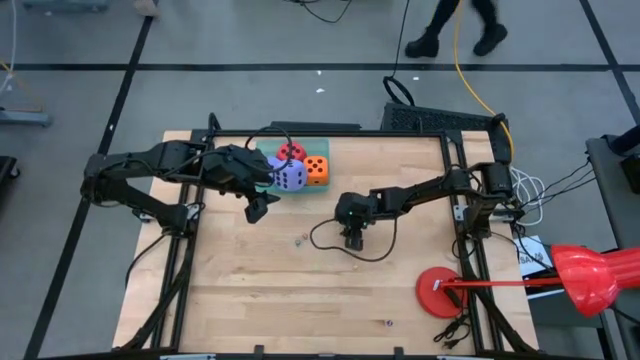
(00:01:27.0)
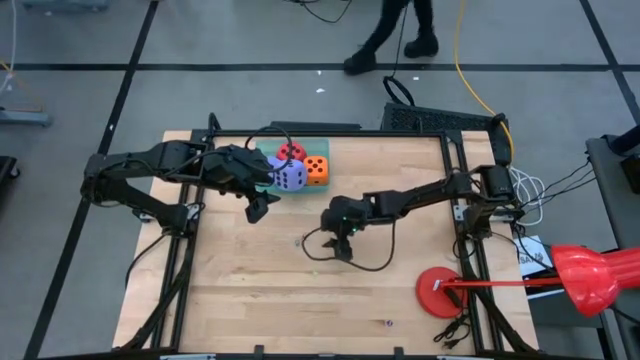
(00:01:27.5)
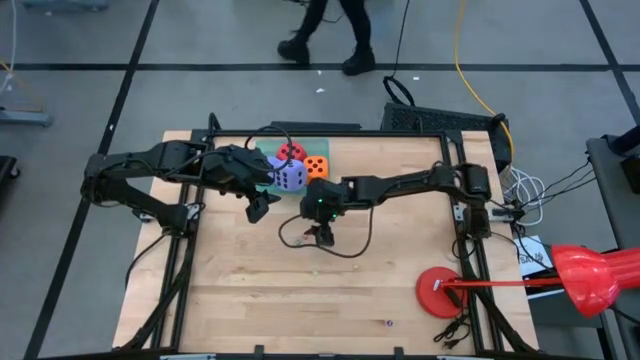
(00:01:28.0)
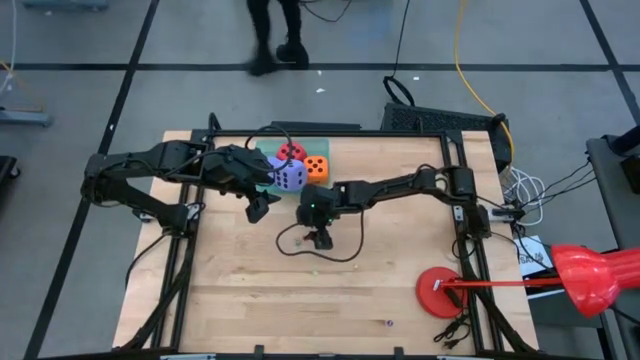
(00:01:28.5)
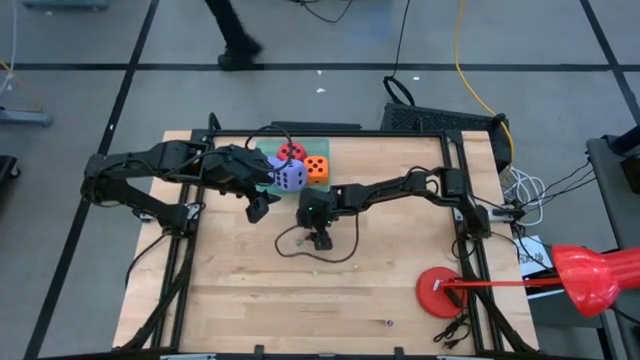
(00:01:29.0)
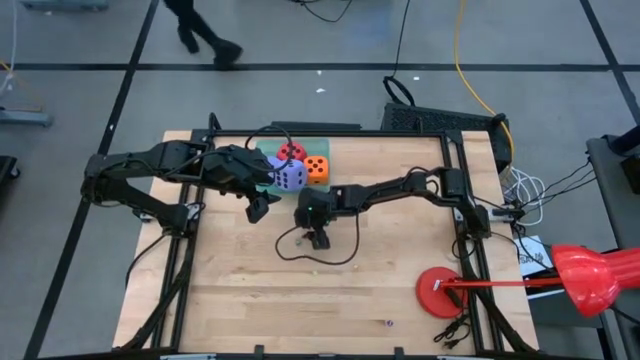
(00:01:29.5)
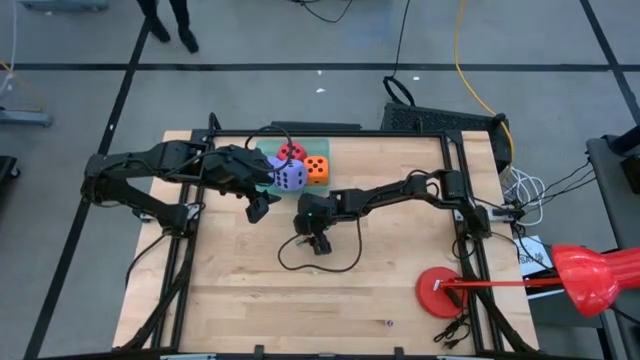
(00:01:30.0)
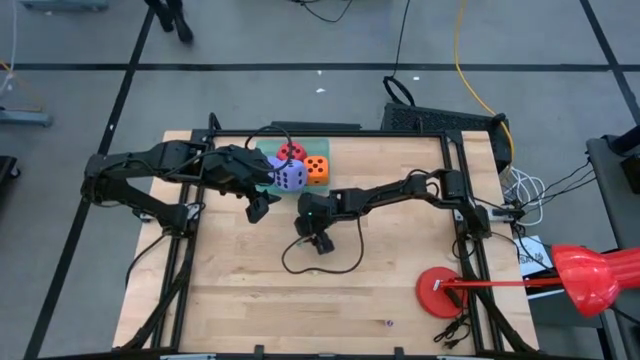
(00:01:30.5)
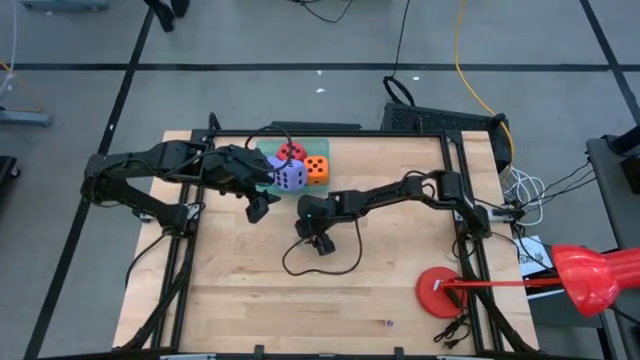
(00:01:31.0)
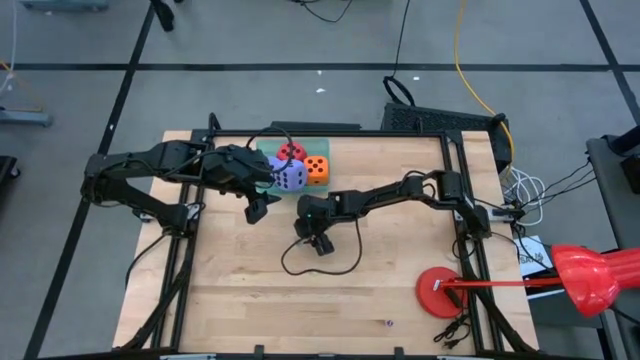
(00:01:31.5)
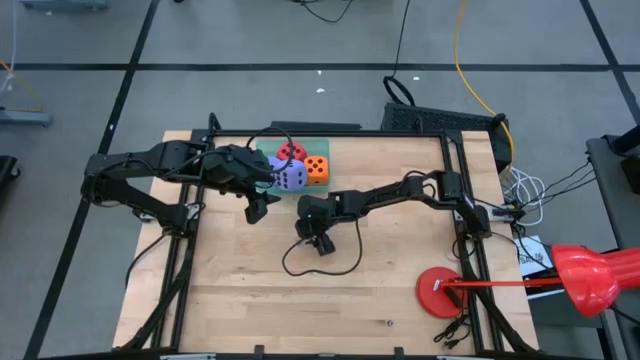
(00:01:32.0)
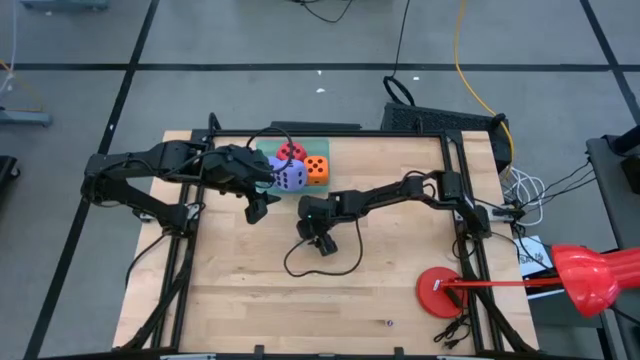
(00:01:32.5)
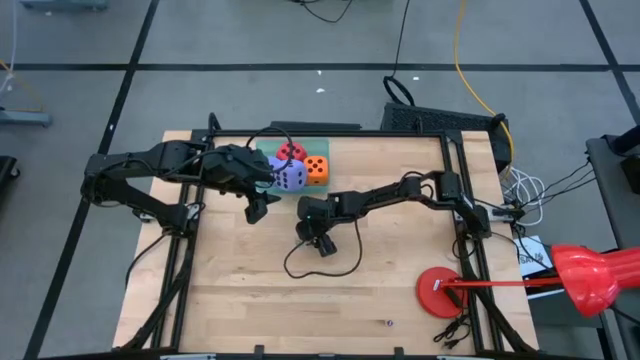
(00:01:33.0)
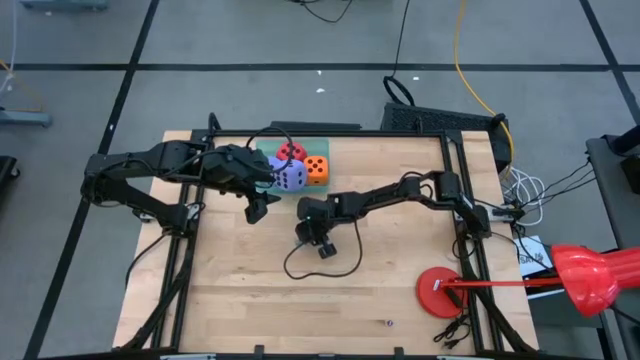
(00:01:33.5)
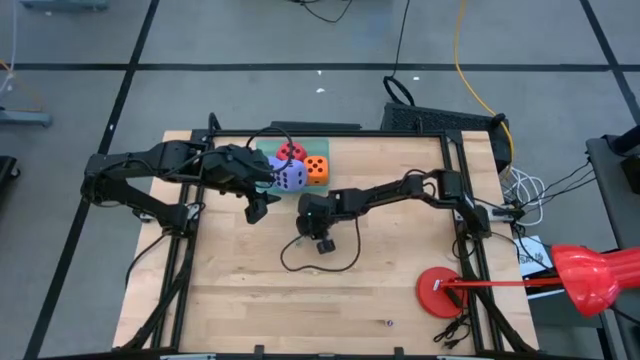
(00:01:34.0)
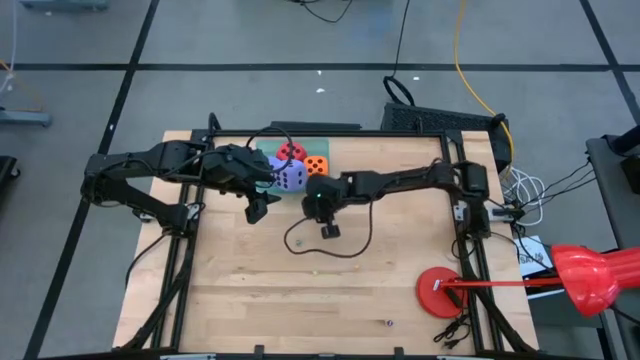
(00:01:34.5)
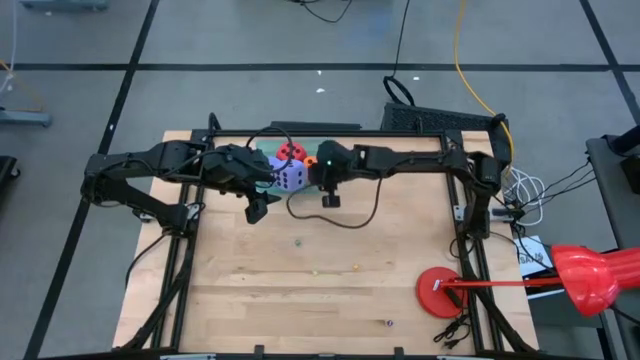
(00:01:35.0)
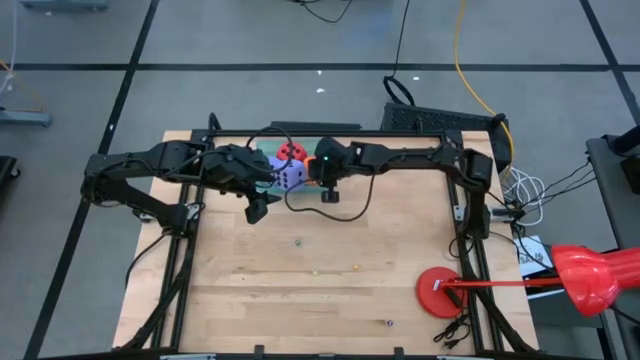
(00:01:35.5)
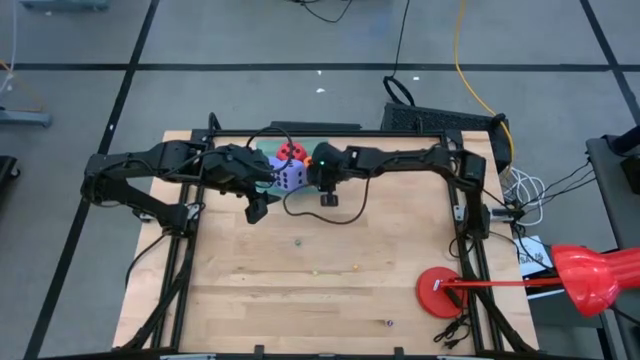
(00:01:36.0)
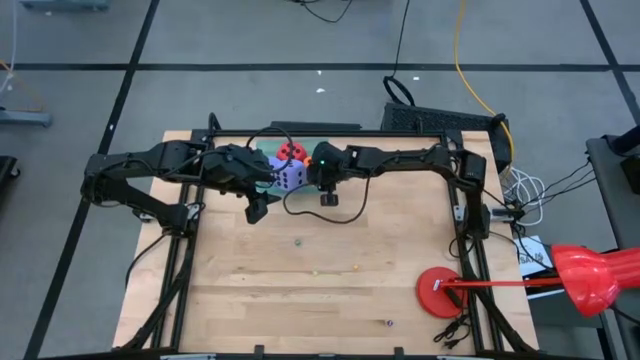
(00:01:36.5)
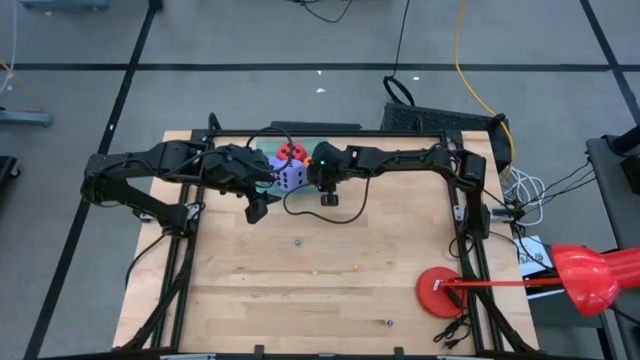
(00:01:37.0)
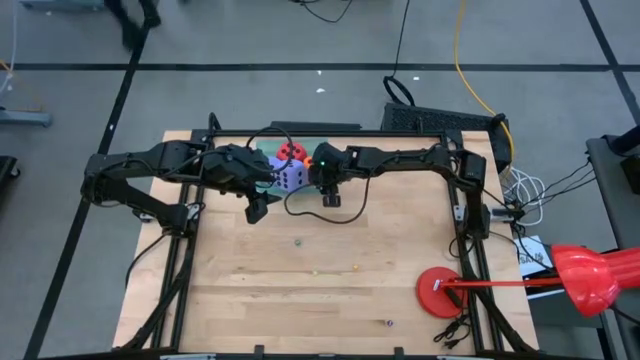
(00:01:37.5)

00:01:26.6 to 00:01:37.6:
Task: Pick & Place Dice
Put the small red dice into the green bin

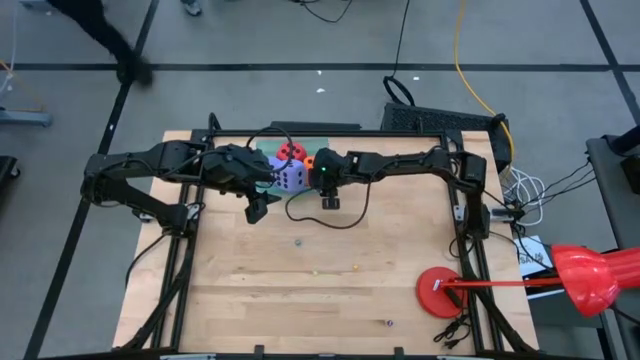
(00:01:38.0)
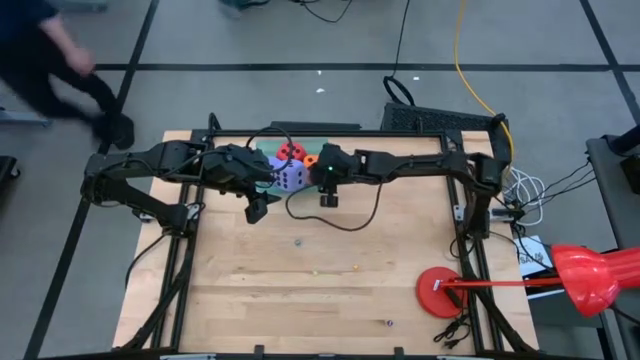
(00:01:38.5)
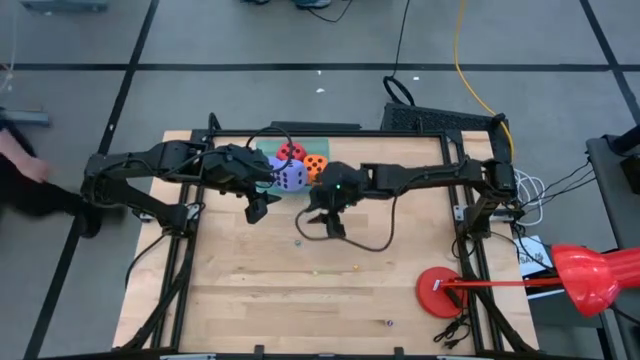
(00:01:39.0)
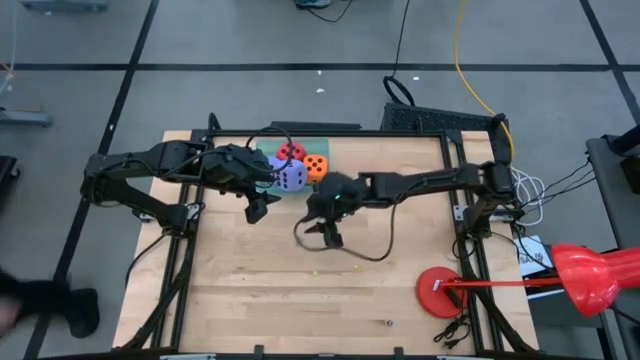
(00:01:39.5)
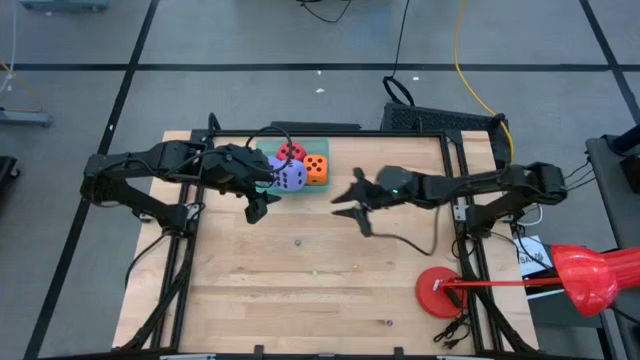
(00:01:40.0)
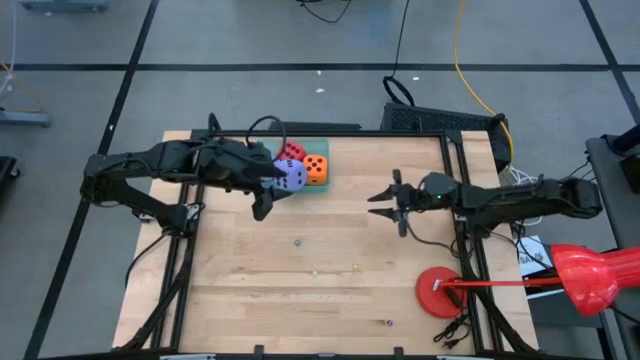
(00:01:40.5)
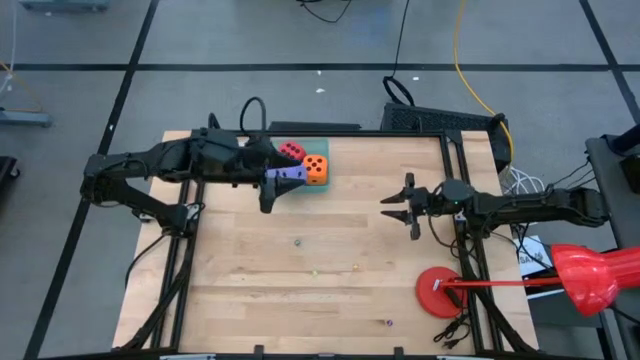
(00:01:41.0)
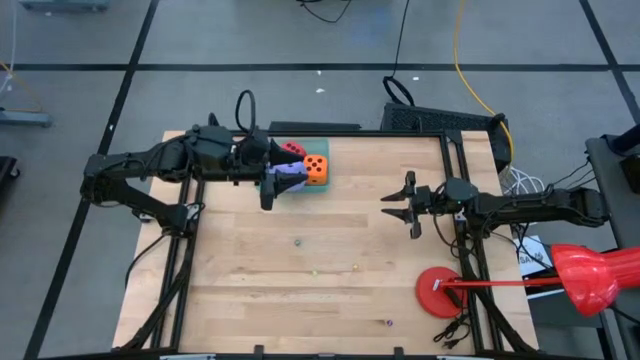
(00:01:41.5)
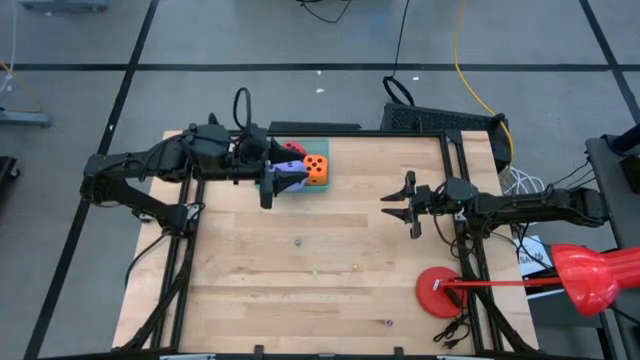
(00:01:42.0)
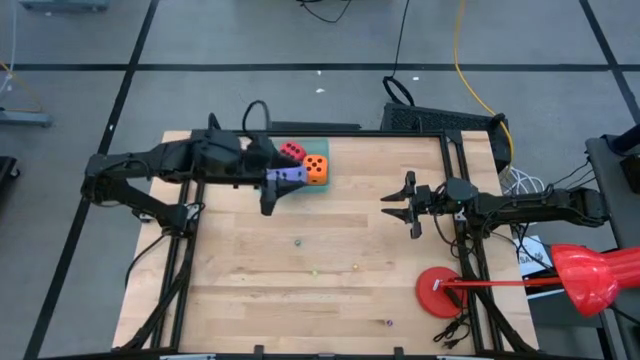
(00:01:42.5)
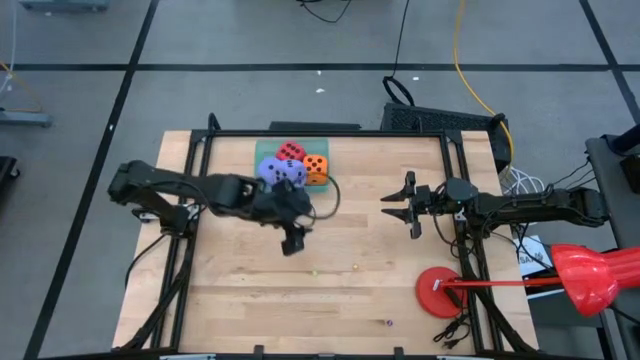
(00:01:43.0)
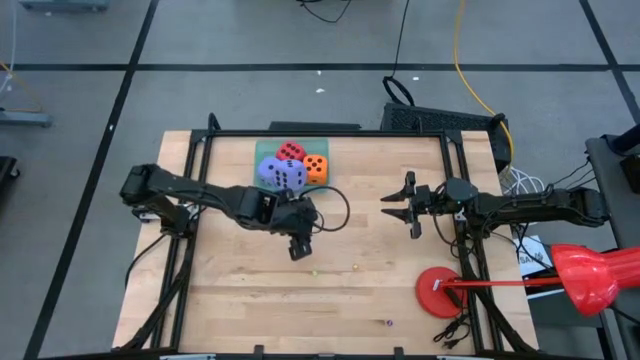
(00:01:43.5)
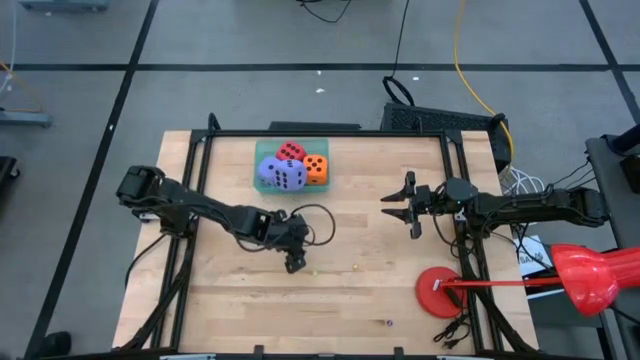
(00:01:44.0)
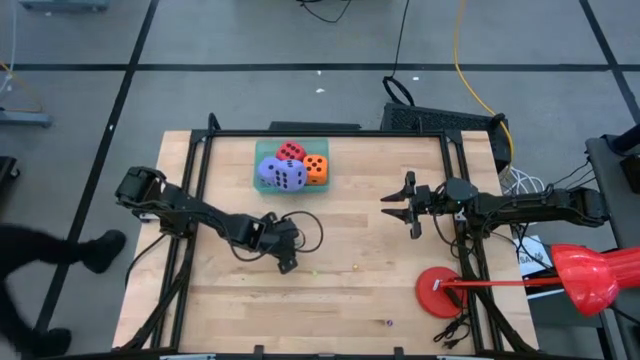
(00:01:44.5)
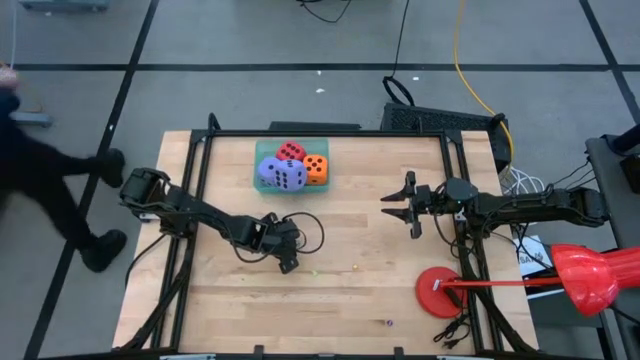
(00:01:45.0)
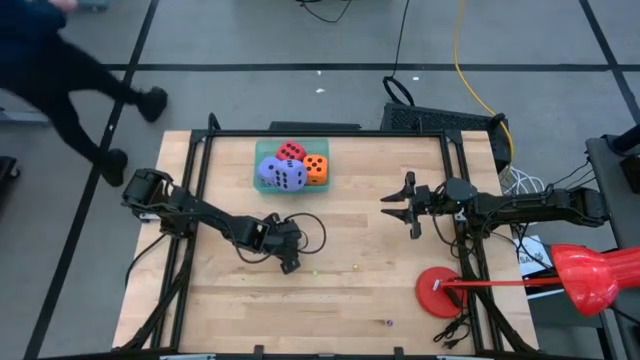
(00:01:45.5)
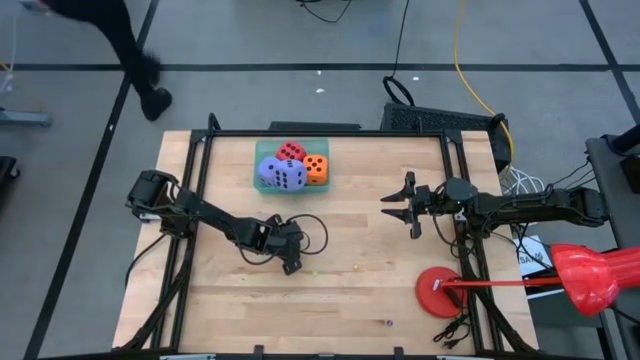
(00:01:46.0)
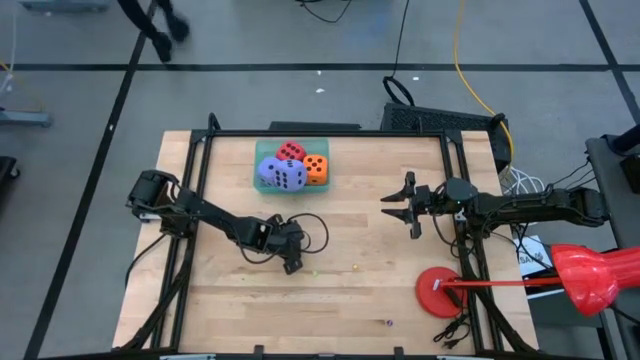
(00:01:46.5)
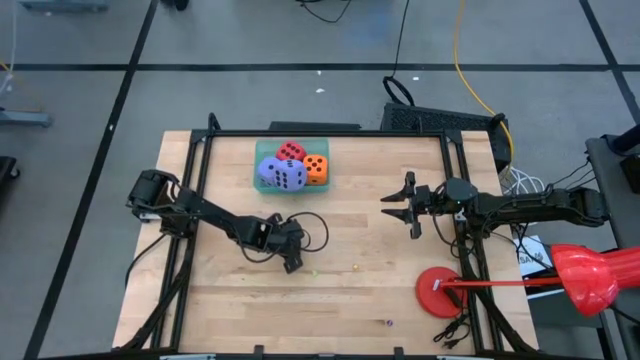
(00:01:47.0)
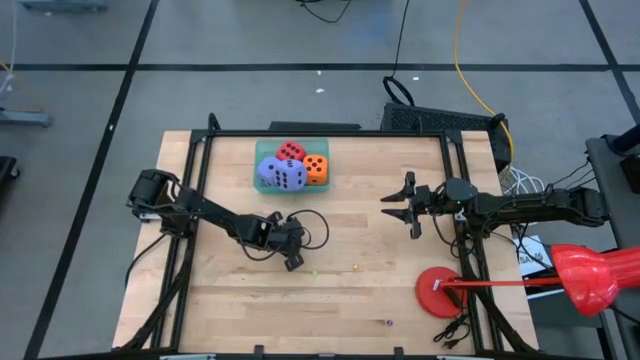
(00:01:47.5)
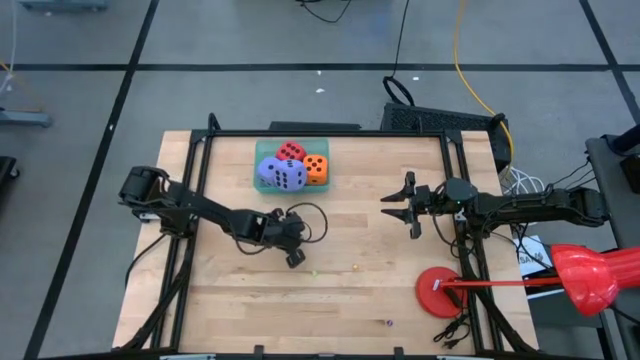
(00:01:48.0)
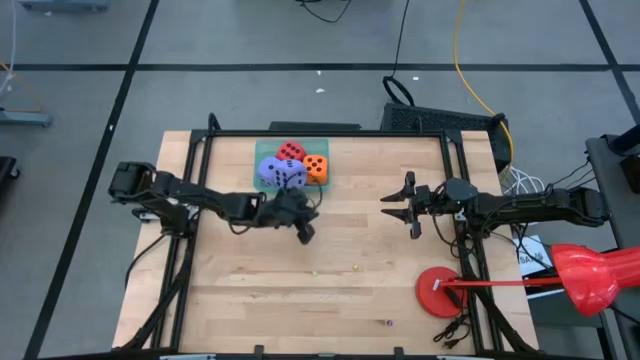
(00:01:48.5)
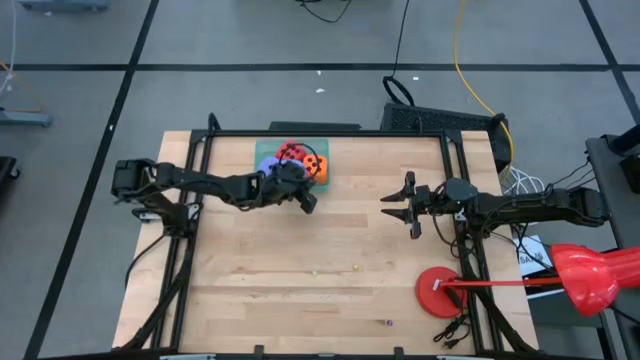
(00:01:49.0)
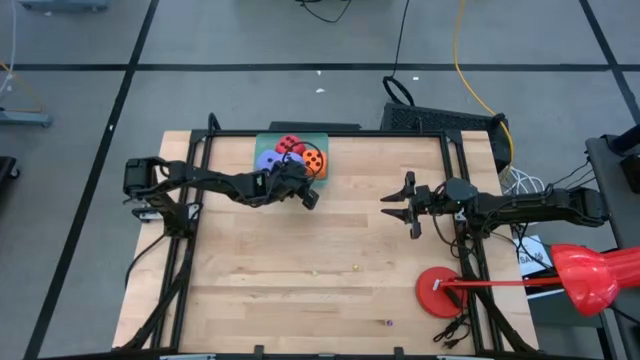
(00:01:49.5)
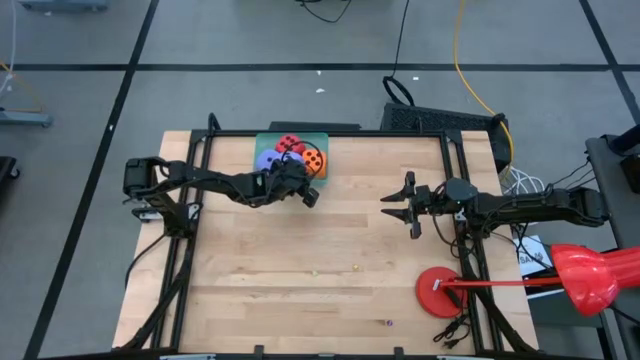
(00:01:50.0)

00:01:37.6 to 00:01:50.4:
Put the small green dice into the green bin
